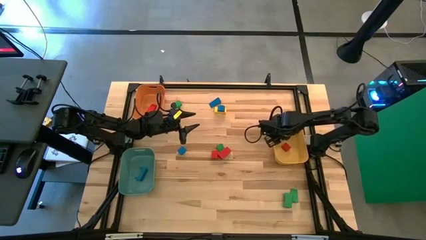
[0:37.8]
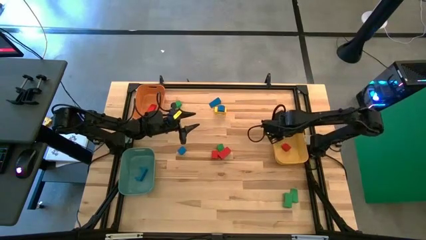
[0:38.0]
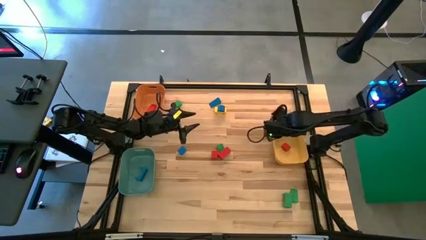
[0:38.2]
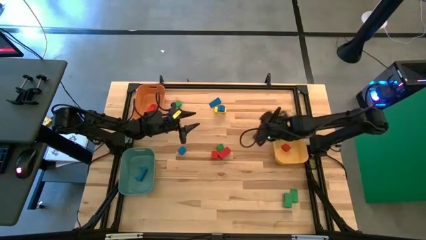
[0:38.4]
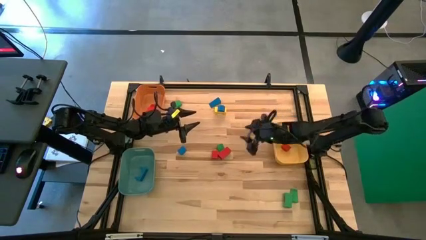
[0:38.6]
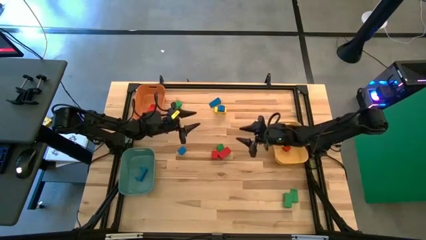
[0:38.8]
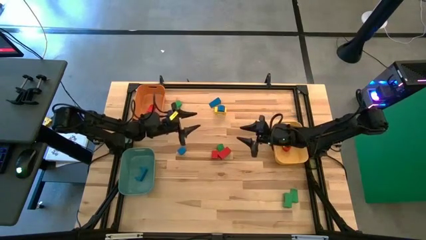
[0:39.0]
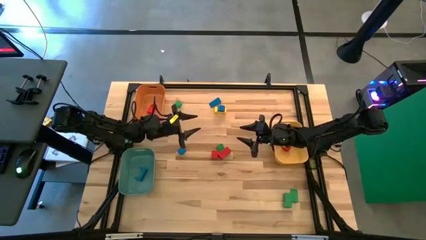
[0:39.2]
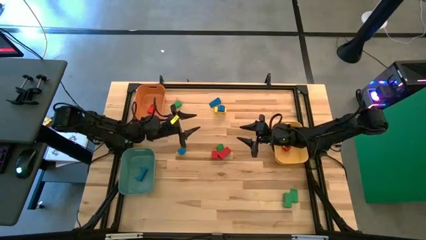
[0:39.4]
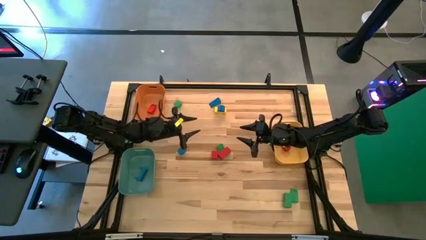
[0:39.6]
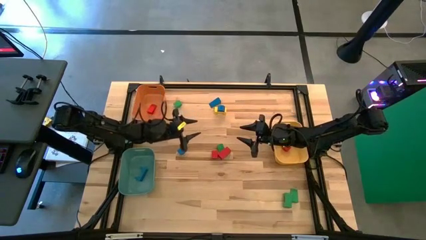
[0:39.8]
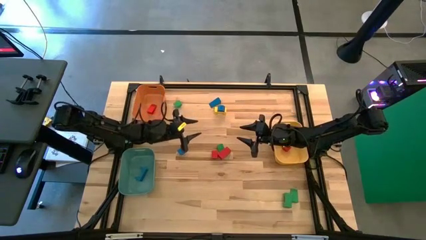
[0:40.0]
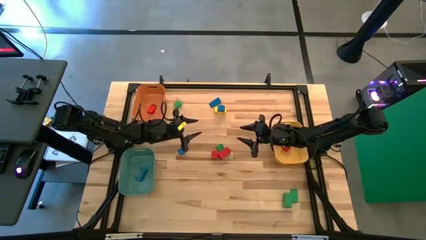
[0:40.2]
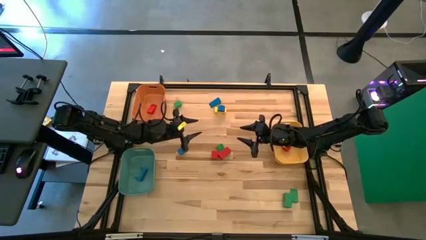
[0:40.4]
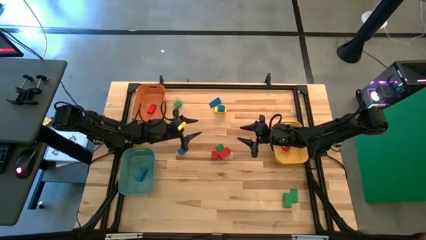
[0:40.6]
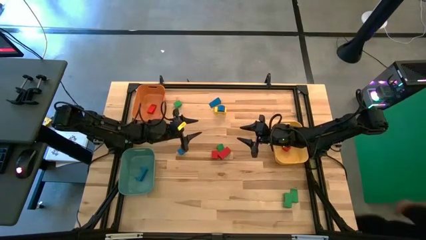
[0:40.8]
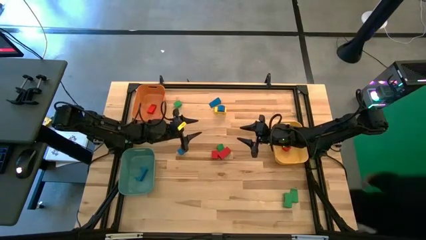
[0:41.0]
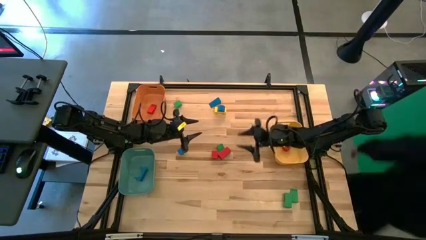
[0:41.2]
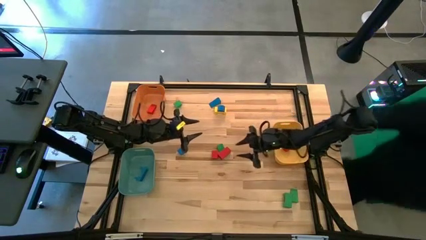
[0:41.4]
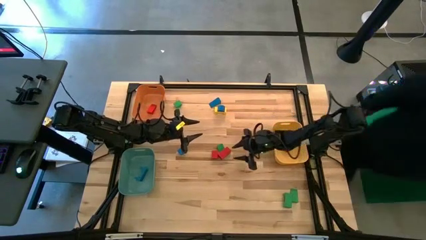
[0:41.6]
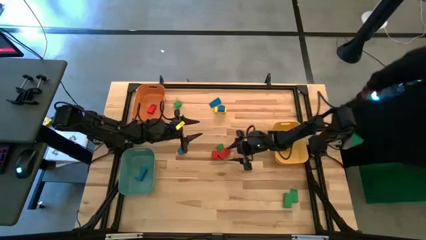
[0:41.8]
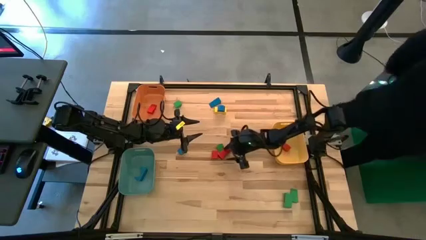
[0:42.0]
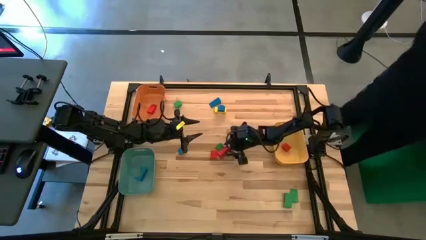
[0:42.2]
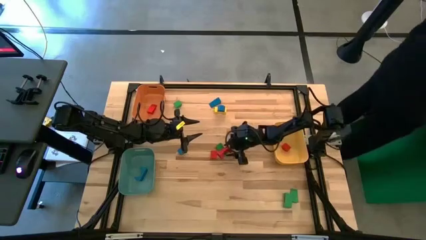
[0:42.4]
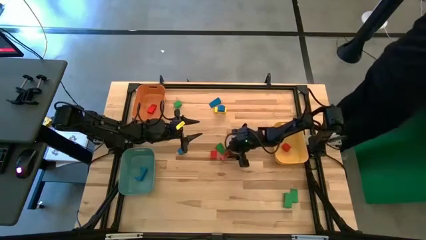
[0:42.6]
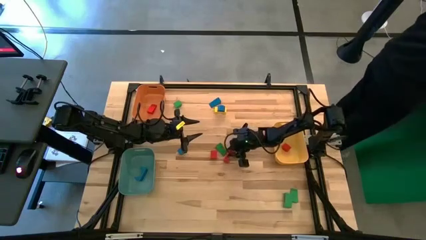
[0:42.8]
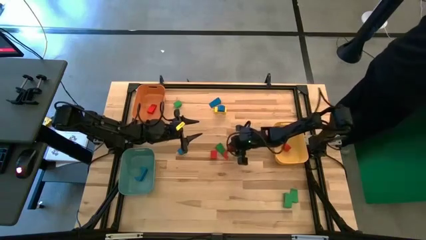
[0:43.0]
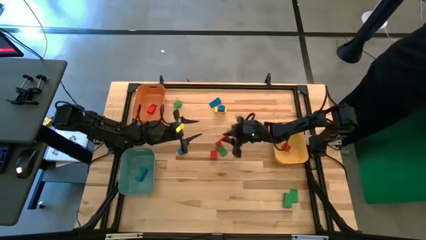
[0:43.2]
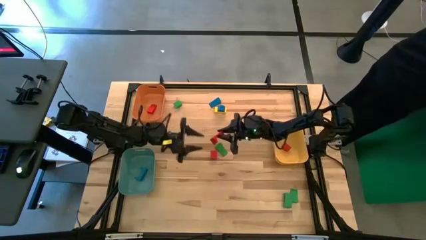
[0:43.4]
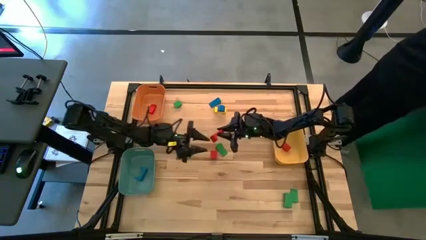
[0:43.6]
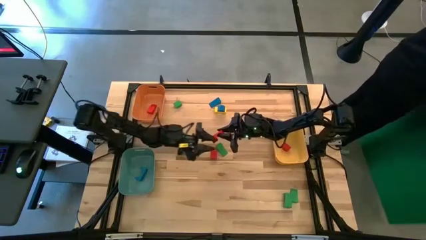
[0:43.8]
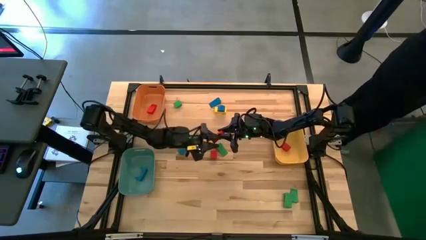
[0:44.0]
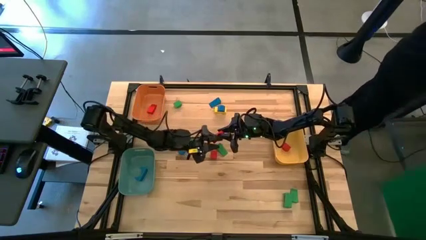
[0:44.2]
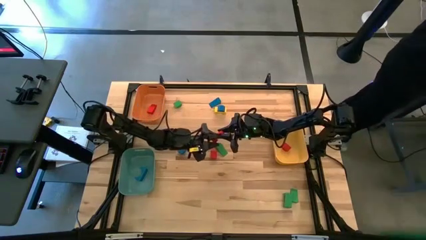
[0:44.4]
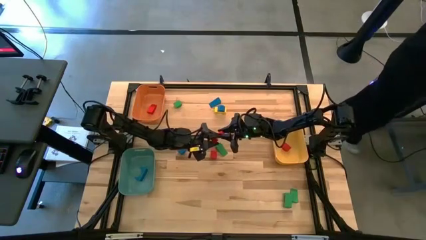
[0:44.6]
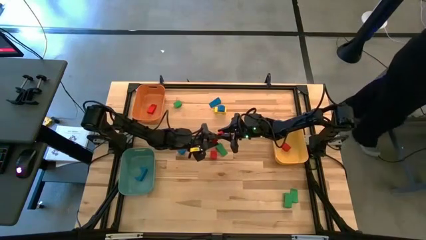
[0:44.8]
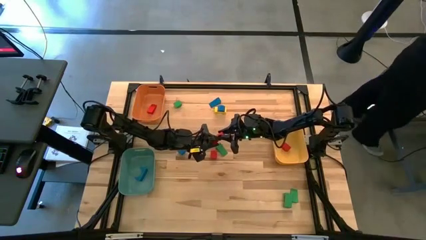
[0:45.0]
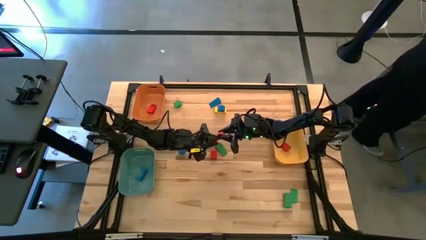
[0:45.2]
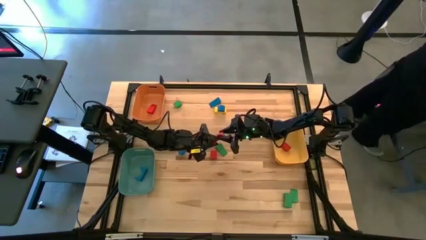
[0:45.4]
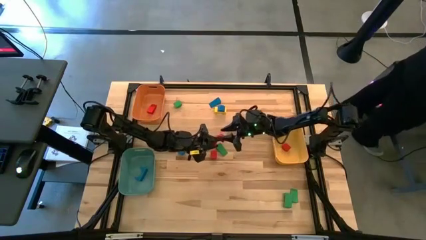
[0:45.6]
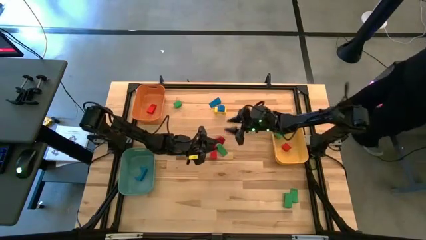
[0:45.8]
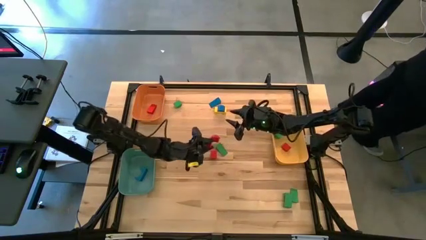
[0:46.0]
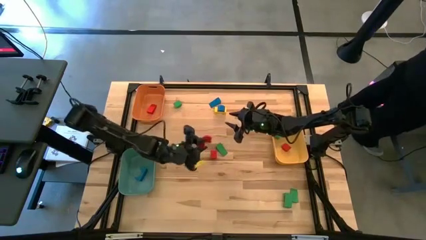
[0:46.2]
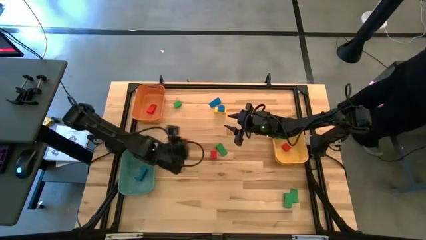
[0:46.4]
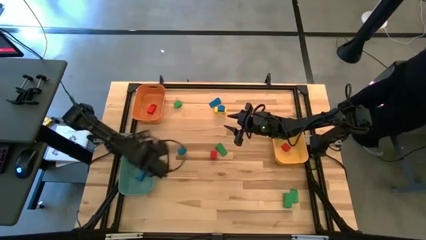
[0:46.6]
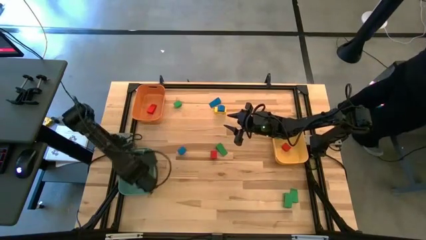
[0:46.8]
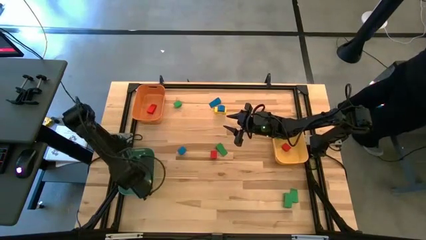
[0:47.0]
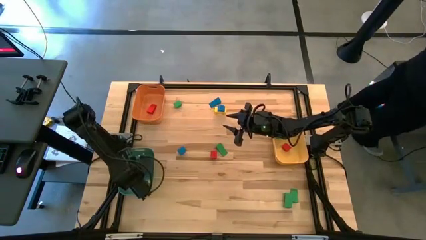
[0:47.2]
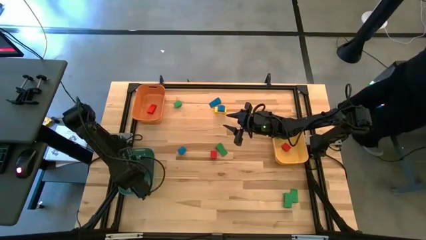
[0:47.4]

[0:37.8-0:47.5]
Task: Sort blocks by size
Put the red arch block into the blue bin

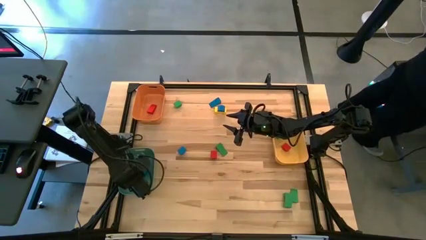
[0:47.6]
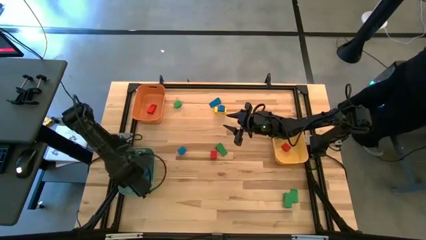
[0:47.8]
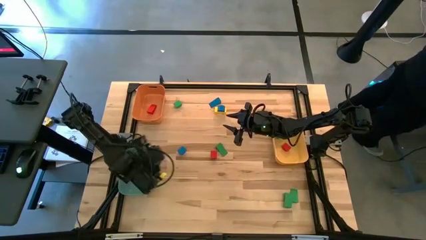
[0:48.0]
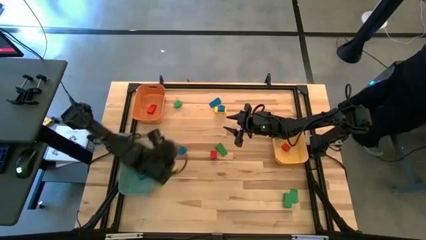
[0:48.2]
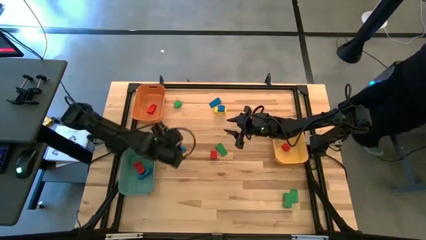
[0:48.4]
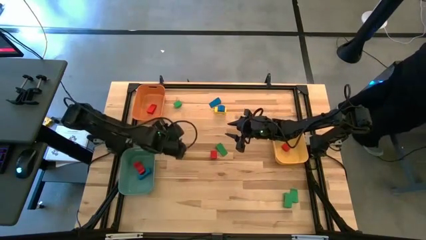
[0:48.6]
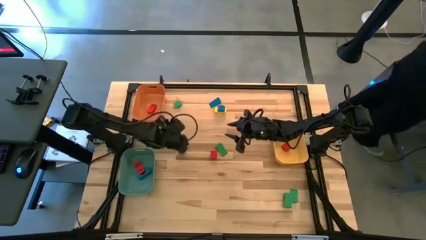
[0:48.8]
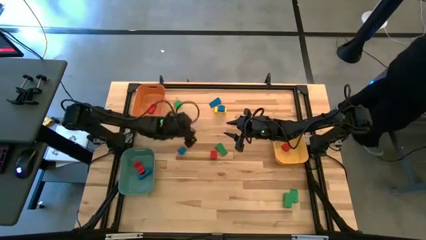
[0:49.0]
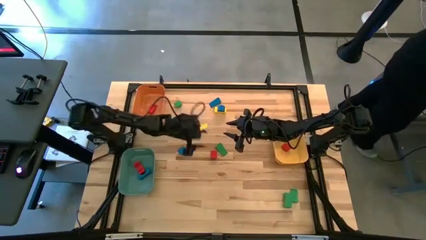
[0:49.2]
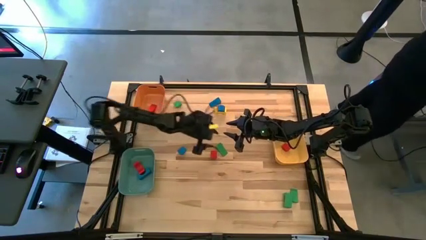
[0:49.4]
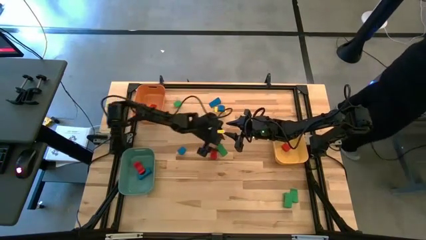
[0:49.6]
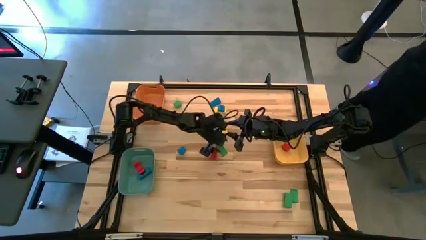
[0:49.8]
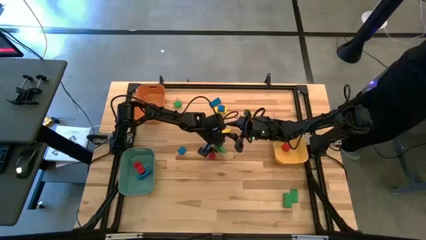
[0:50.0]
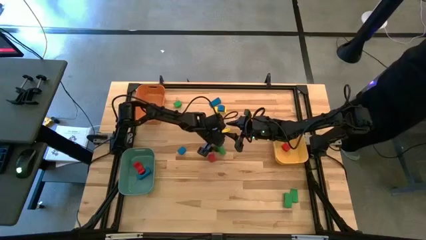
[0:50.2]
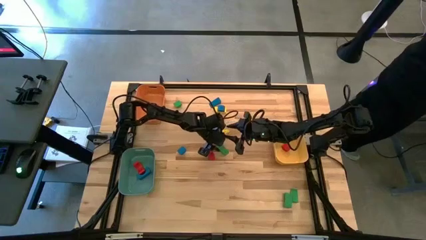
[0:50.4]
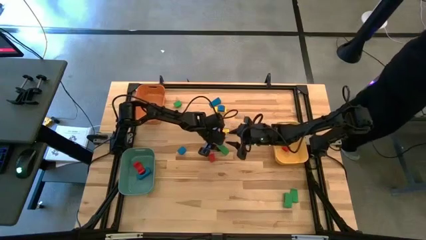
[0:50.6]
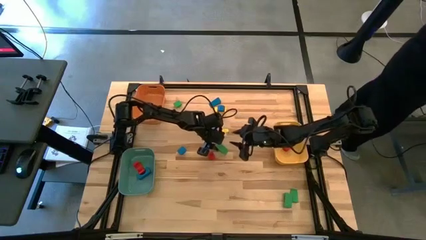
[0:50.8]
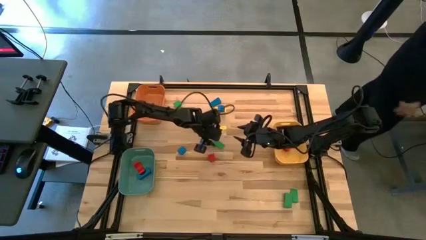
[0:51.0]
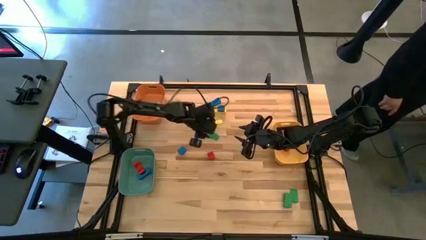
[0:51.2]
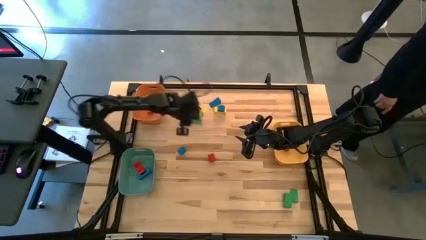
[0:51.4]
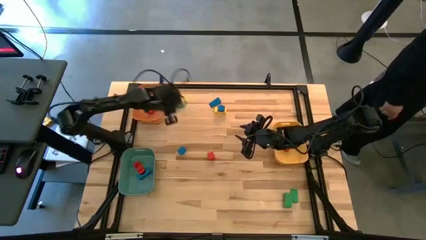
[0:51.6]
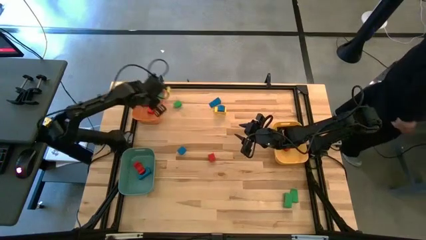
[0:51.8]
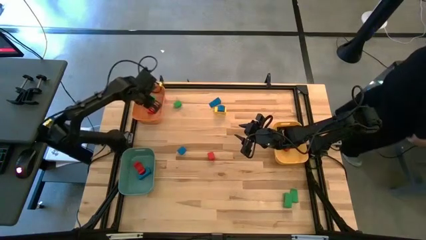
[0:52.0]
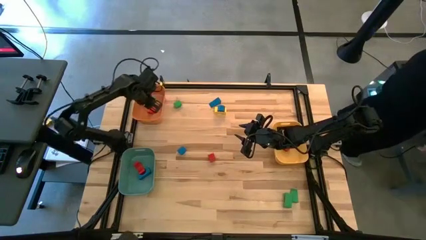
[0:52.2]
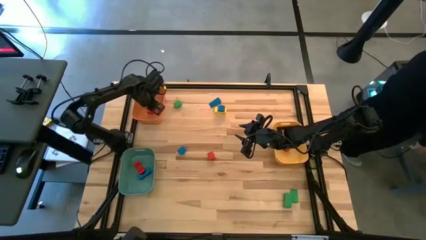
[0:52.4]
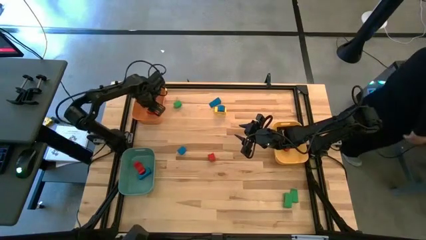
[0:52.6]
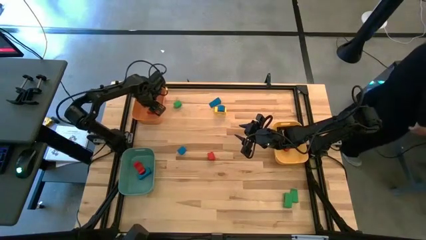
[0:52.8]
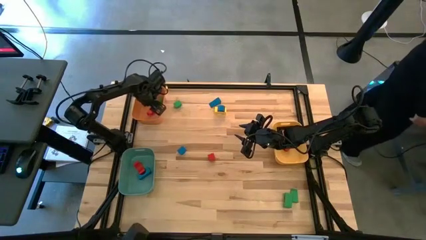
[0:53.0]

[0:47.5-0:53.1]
Put the green triangle block into the orange bin

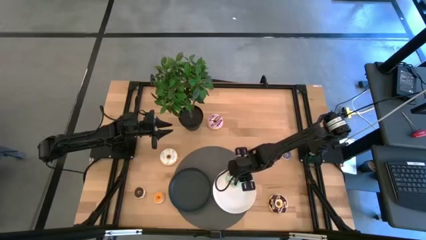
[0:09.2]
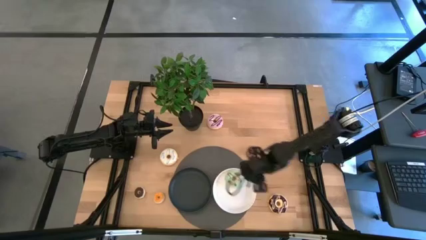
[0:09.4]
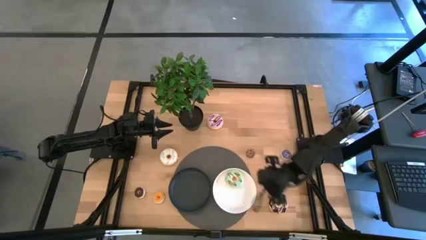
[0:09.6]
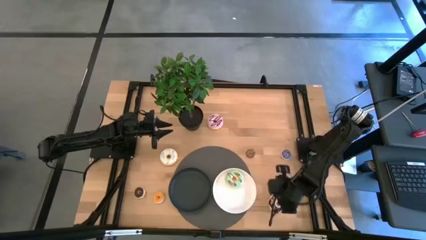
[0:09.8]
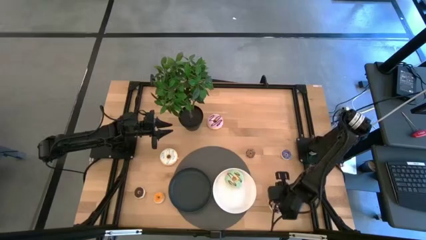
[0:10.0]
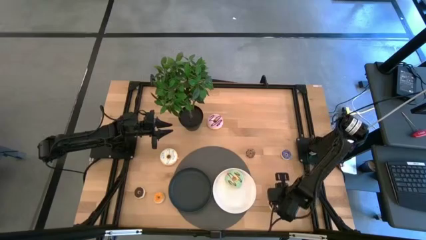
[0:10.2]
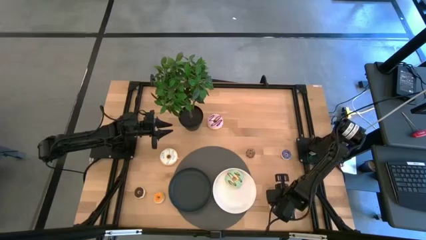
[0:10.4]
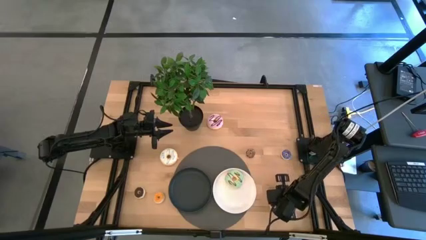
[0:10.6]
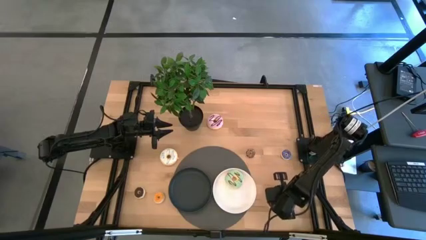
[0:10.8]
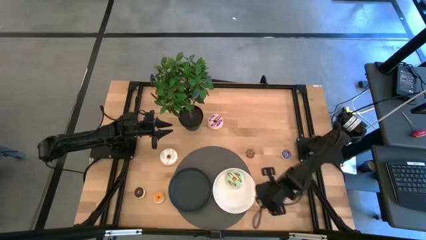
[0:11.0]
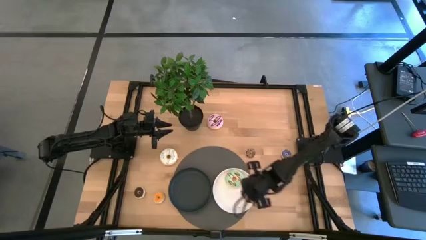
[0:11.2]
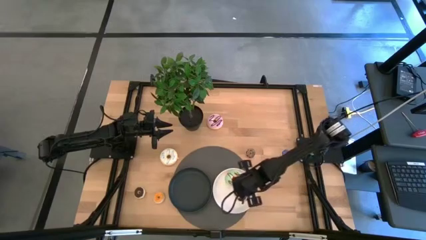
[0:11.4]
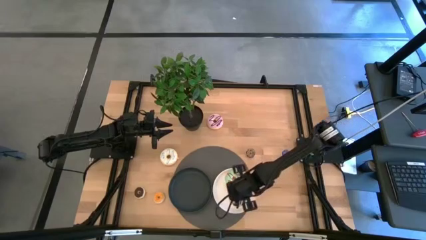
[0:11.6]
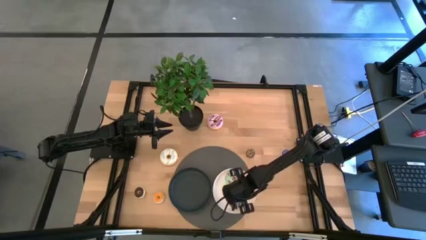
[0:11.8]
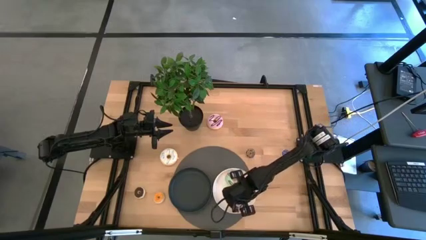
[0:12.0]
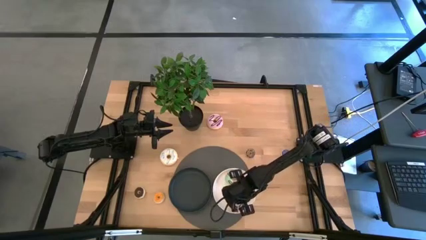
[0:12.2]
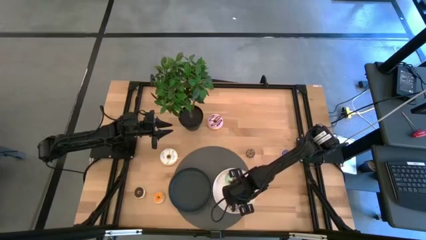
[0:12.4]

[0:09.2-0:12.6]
Task: Pick & Place donuts
Put the big black donut into the white plate
